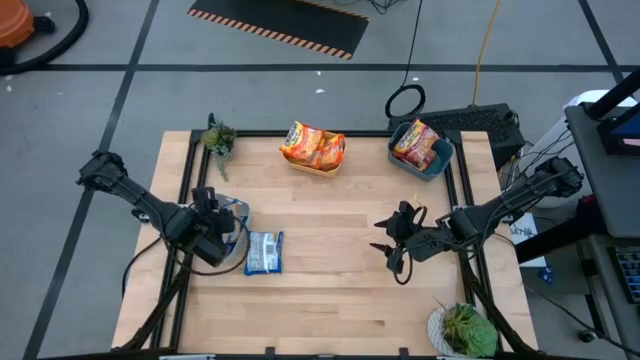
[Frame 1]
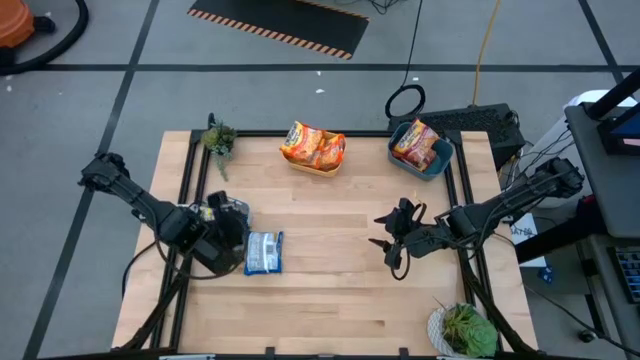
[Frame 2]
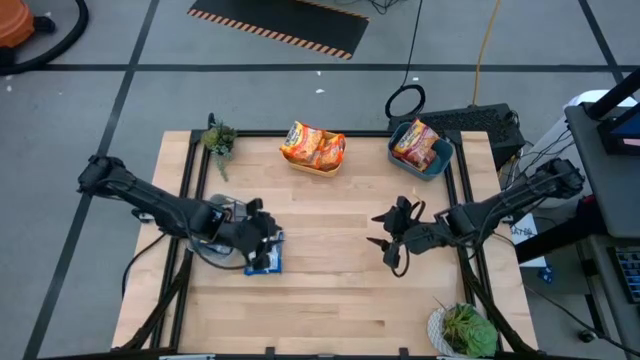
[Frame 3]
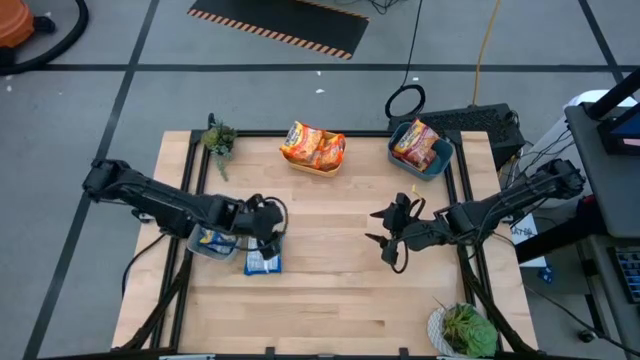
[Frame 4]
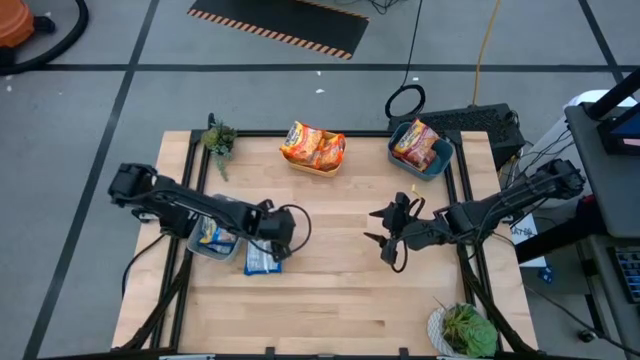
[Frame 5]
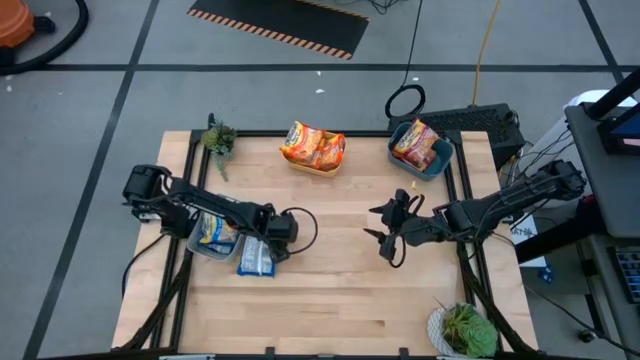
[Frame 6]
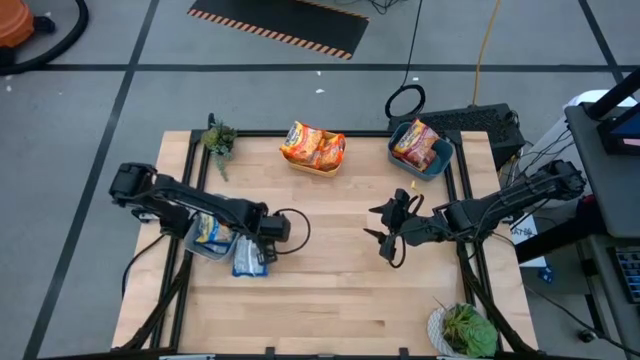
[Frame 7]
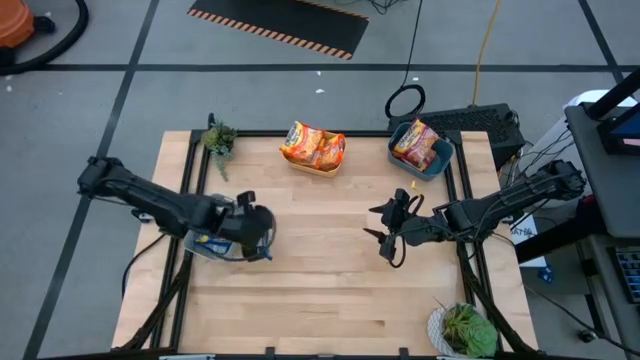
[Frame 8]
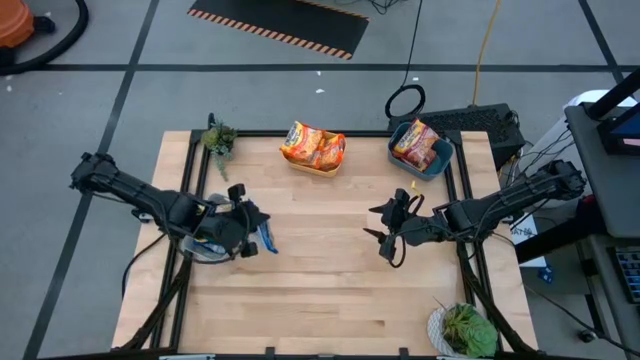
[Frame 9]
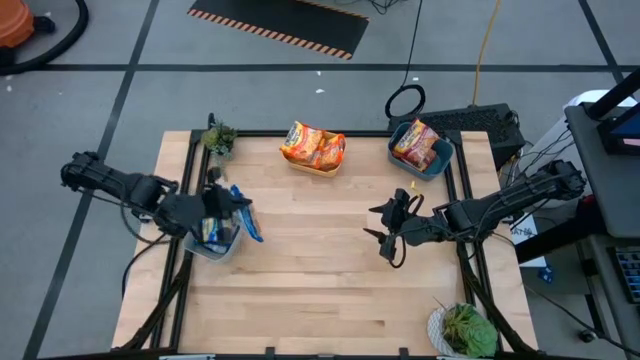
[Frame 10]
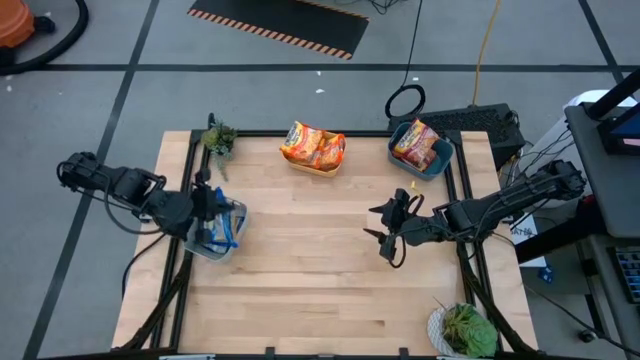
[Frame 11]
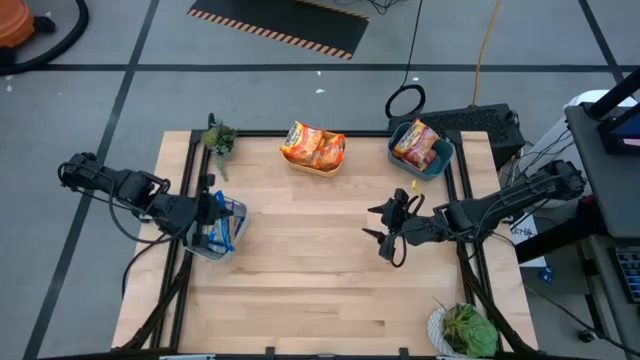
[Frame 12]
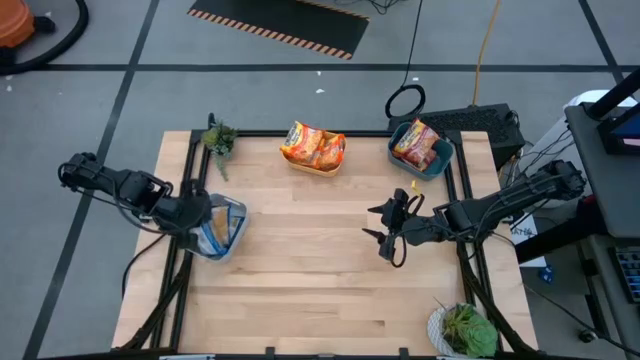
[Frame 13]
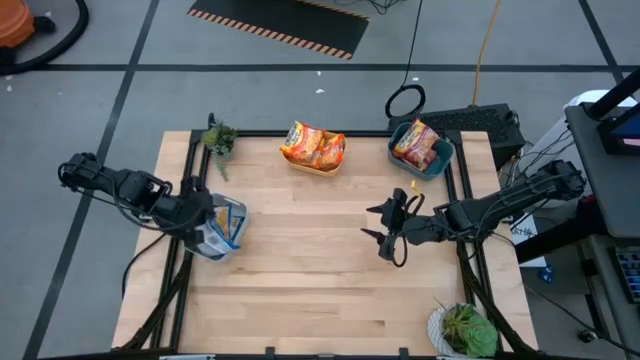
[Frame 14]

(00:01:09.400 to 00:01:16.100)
Task: Sort Maruchan noodles
Put the blue bag into the gray bin

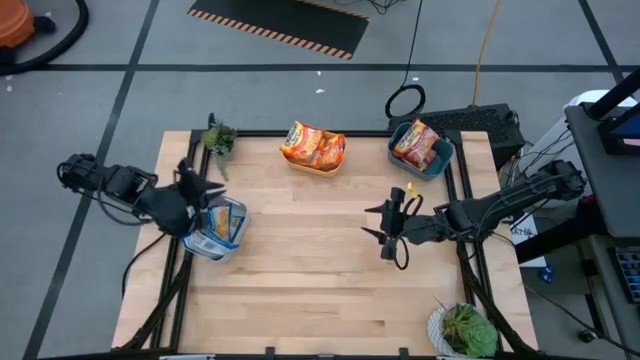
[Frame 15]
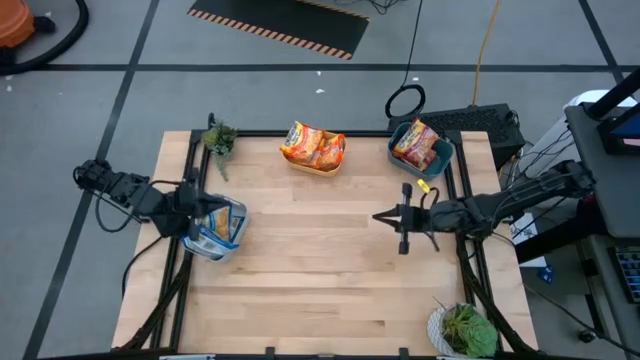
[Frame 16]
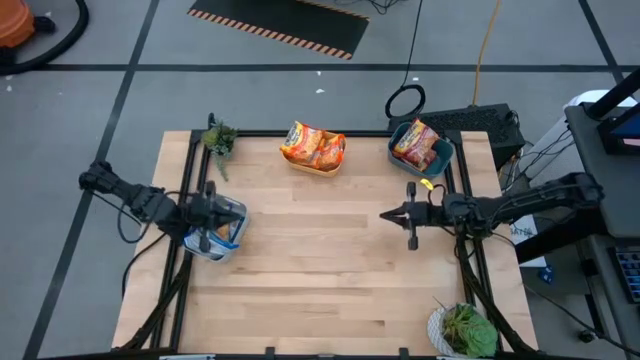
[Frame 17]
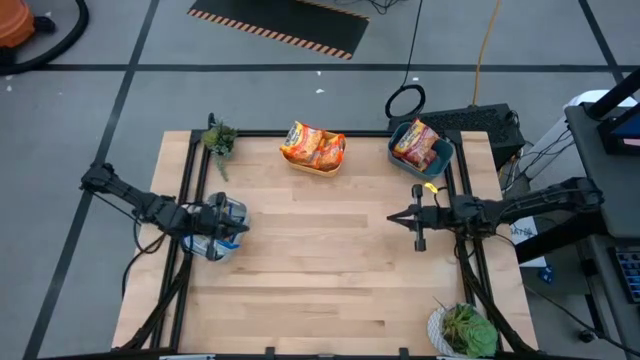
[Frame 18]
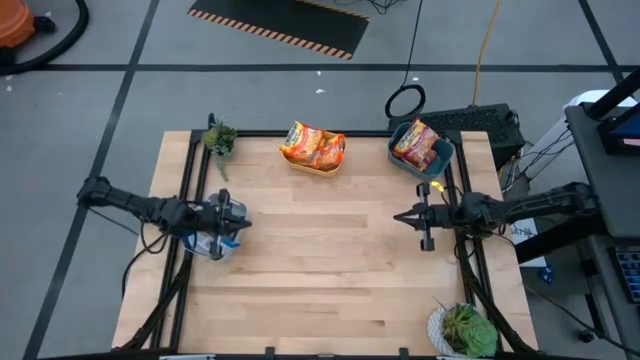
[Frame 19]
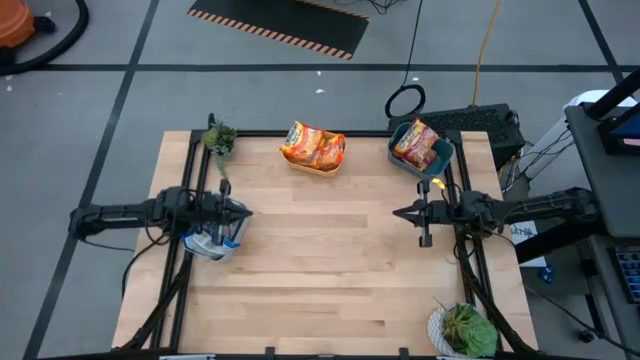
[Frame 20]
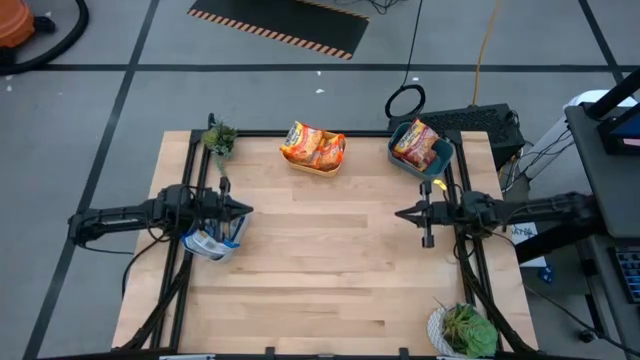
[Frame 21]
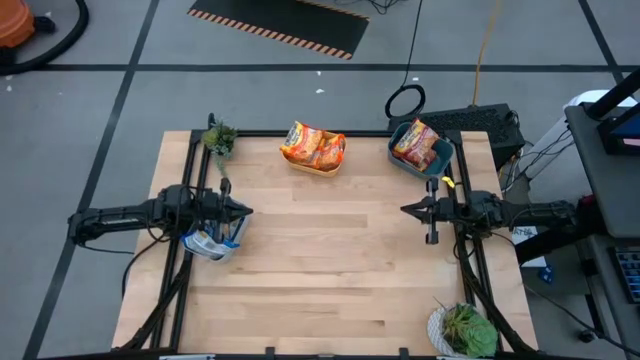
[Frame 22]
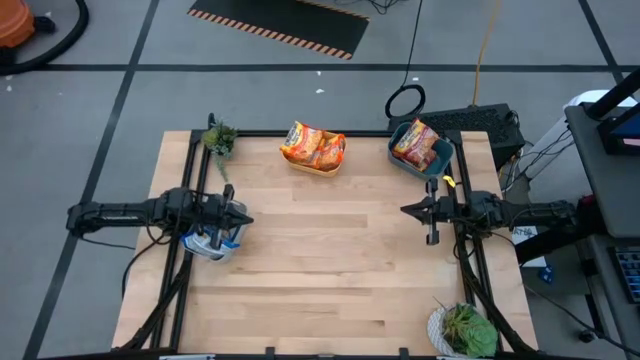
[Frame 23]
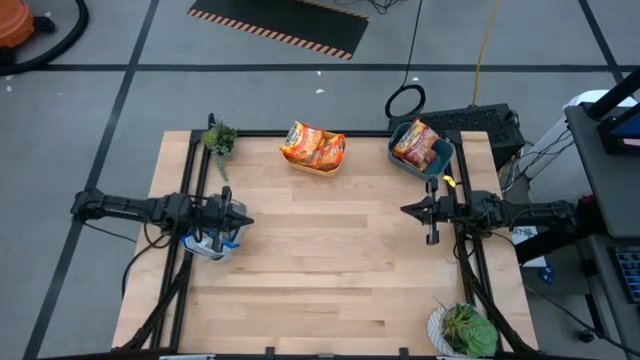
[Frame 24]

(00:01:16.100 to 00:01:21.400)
Return to Home Position

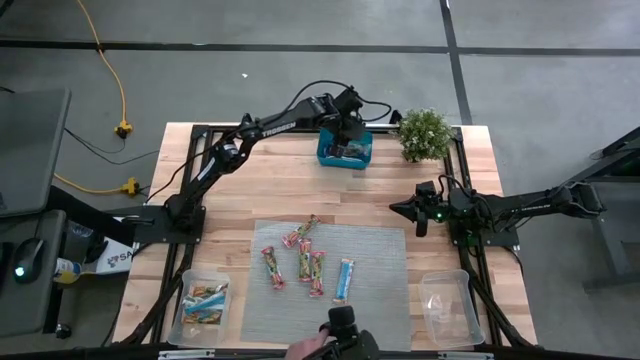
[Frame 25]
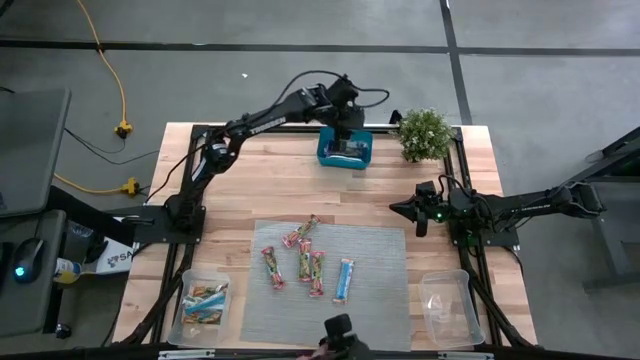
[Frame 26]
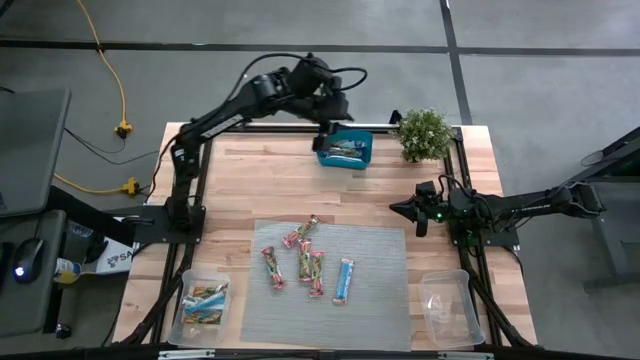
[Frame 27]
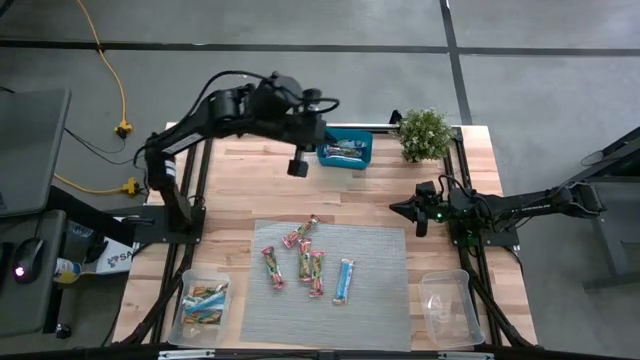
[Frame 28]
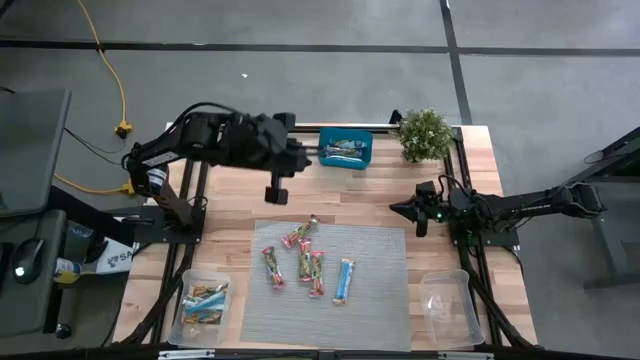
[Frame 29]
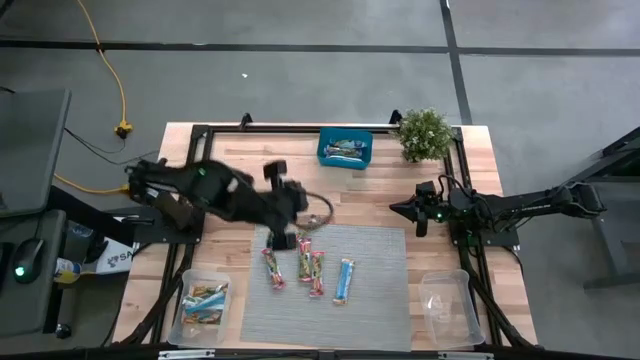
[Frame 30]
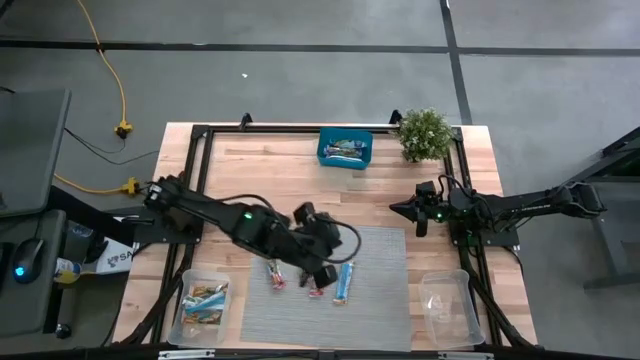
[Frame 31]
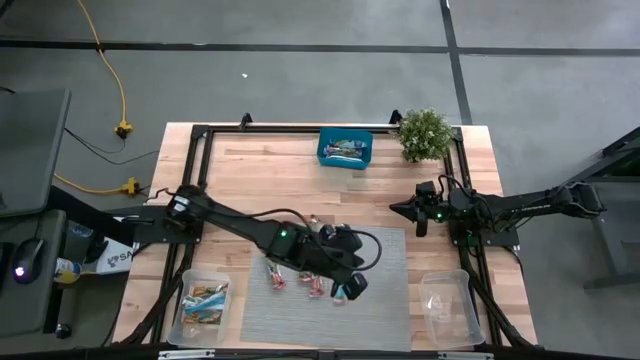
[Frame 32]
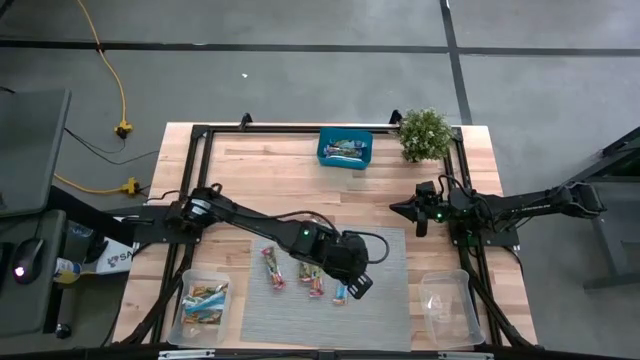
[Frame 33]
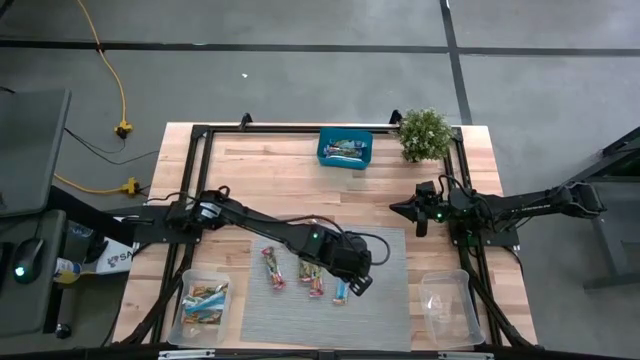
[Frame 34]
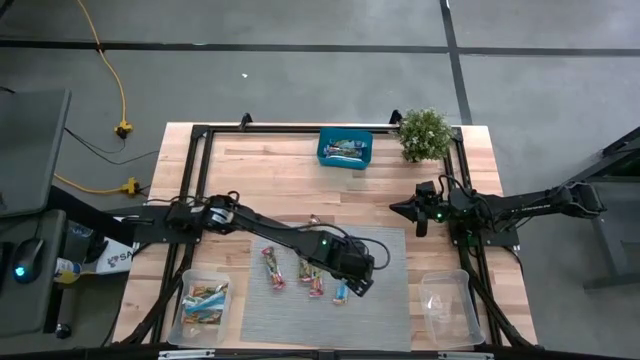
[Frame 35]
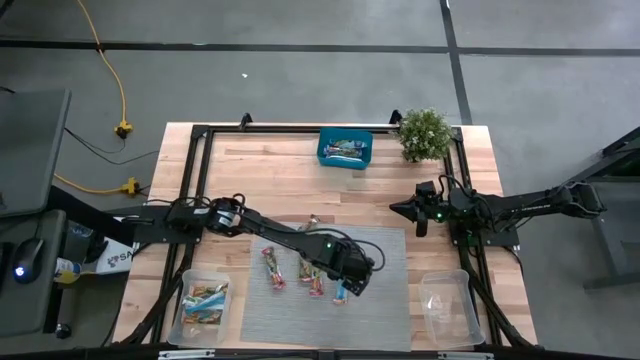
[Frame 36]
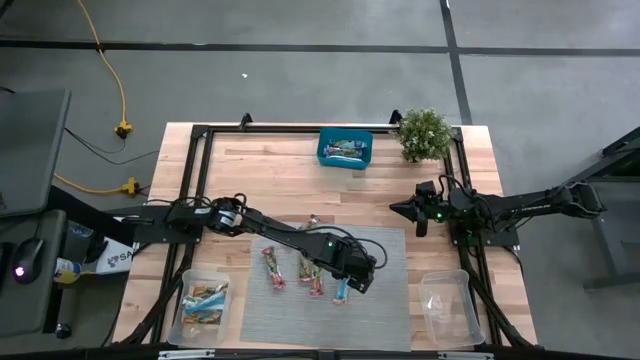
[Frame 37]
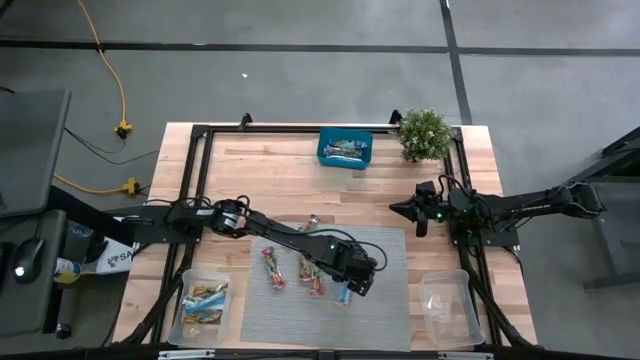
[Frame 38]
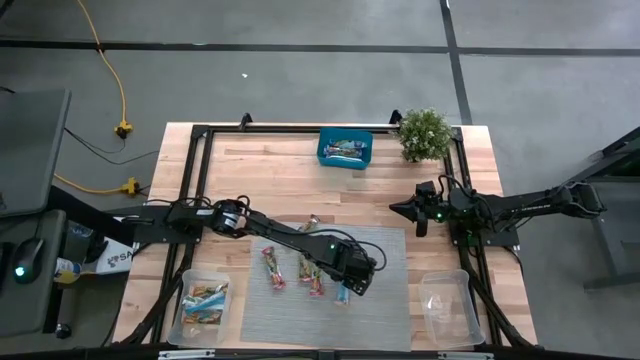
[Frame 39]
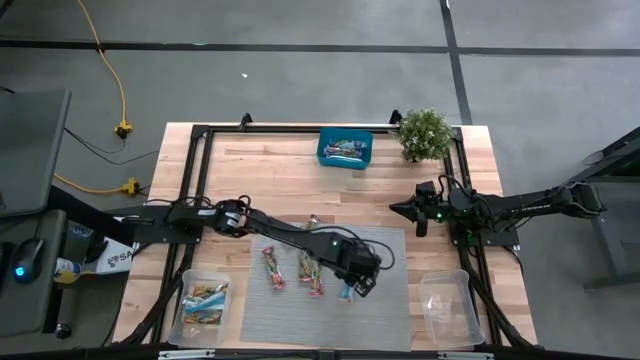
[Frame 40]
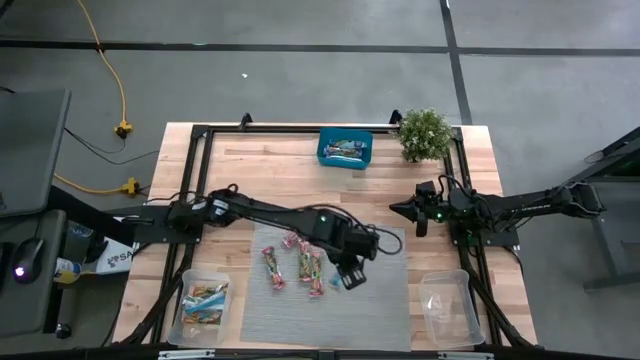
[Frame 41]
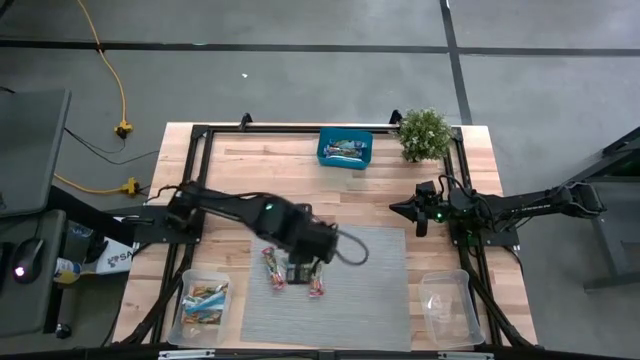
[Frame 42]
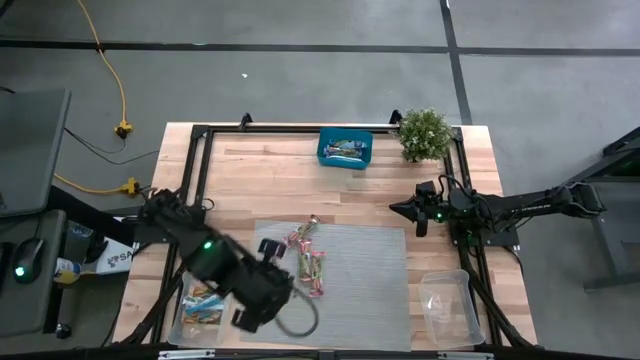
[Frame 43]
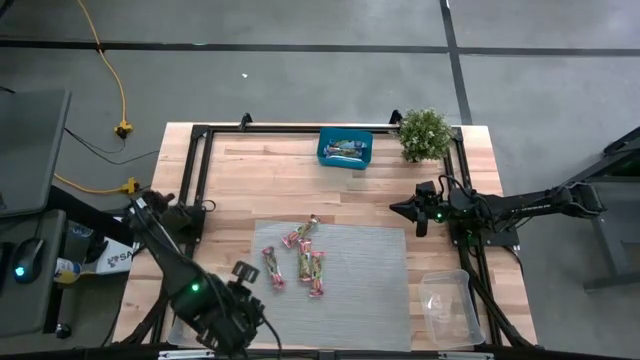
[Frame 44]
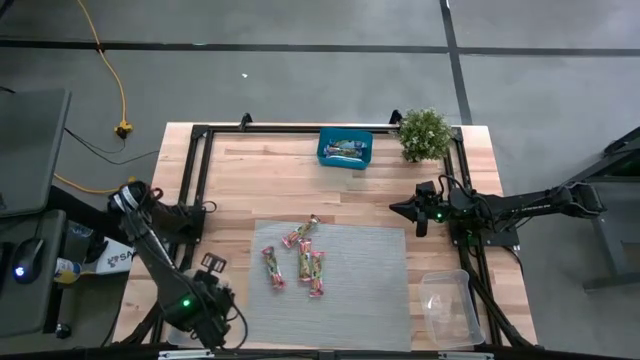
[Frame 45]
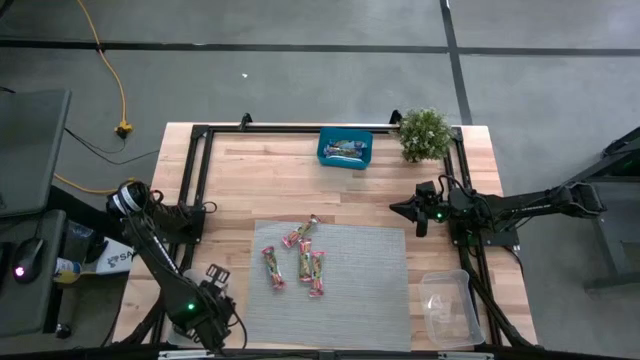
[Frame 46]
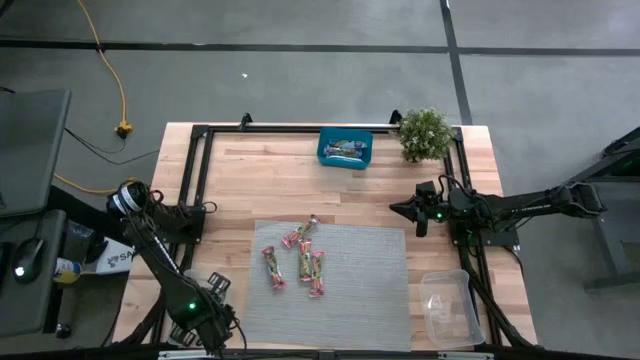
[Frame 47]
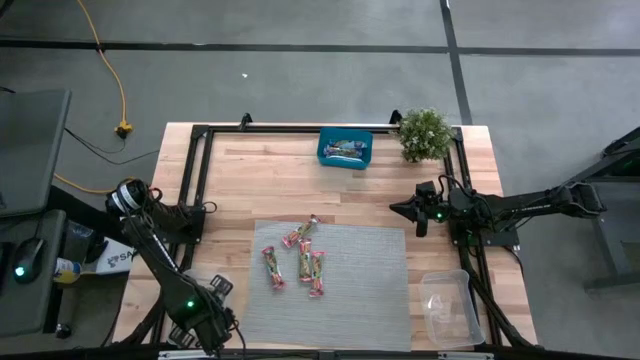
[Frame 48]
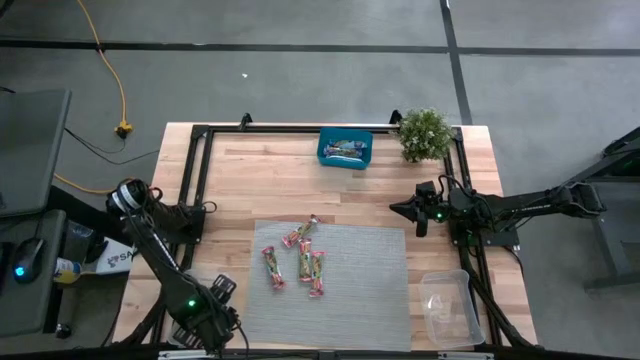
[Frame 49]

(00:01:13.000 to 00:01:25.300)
Task: Pick and place Granola Bars by type
Put the yellow granola bar into the left transparent bin
